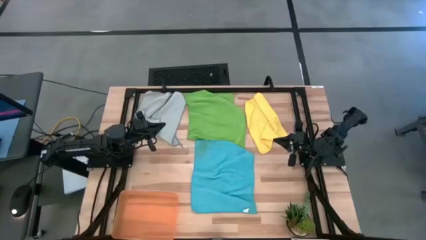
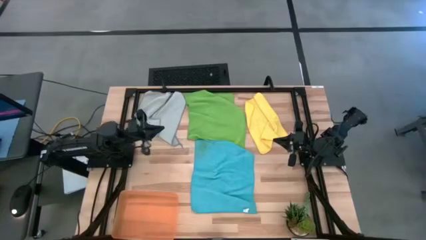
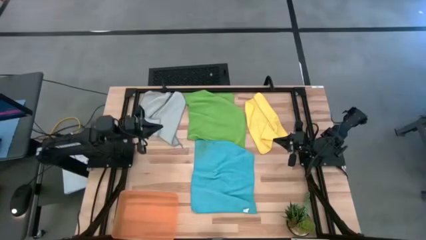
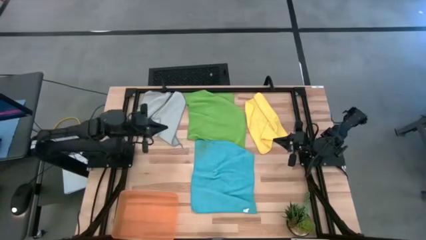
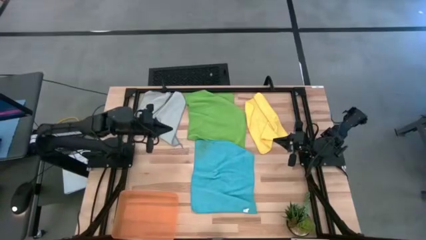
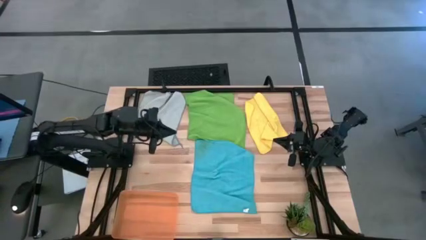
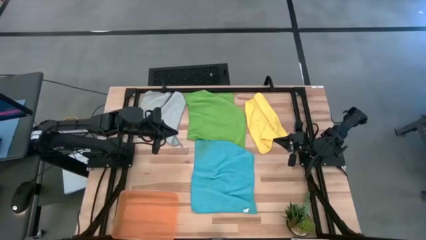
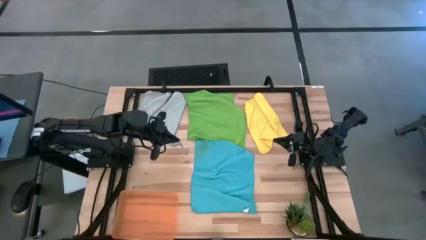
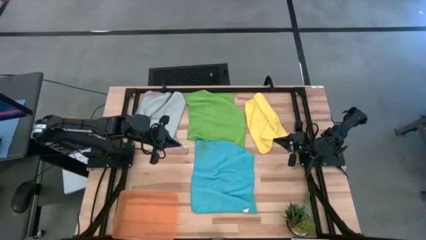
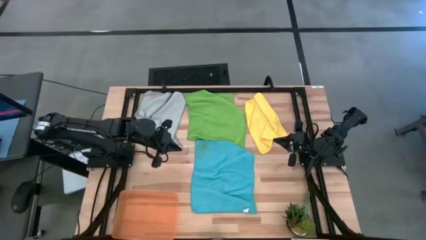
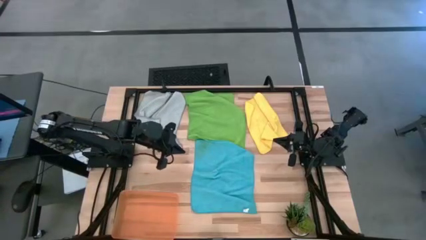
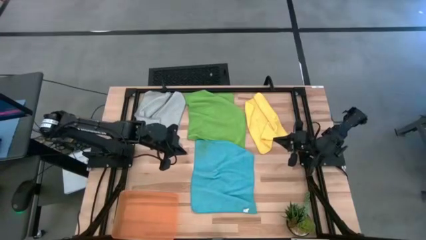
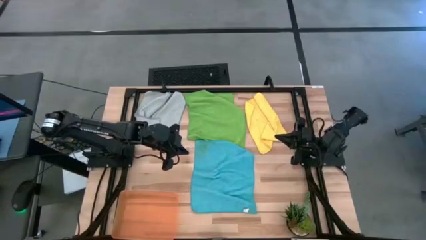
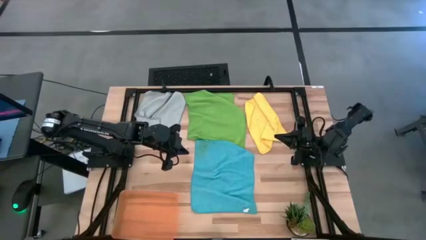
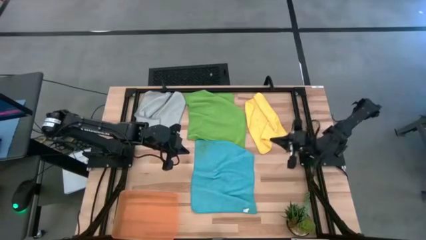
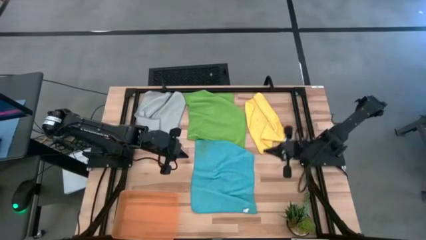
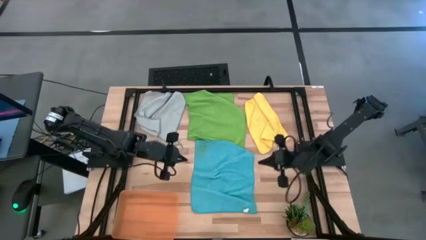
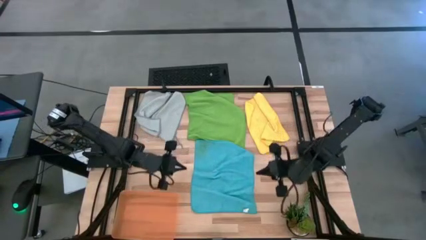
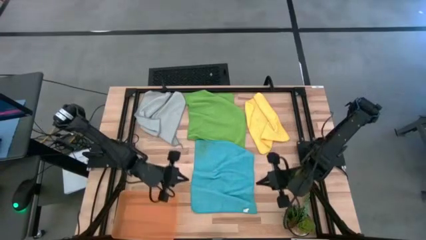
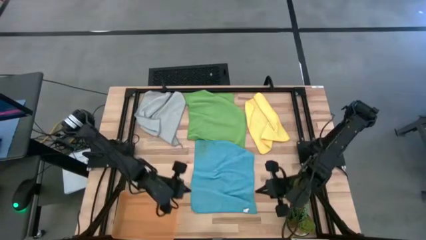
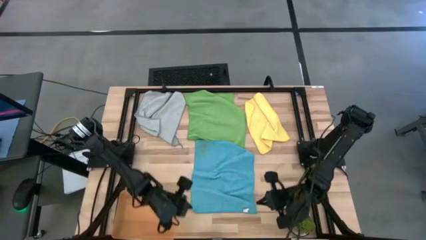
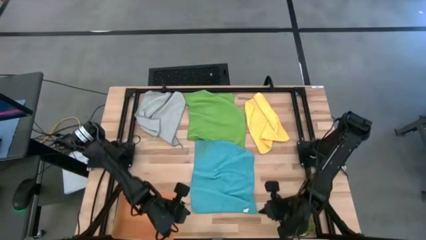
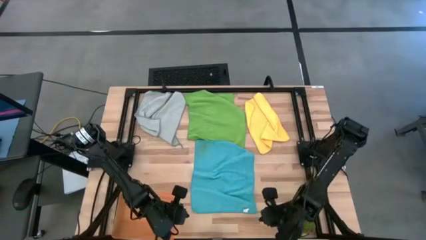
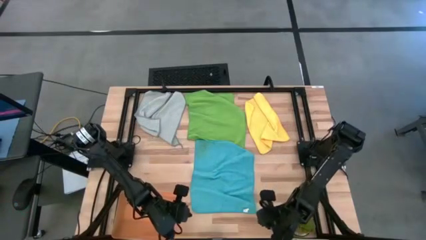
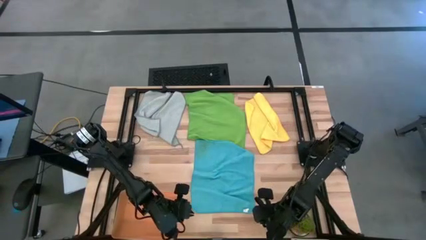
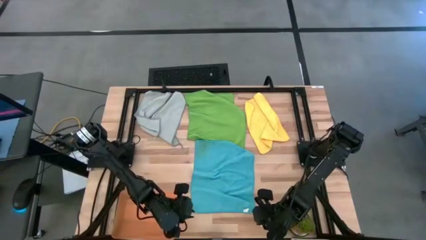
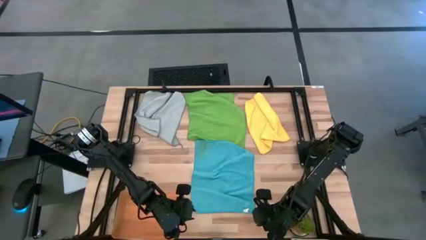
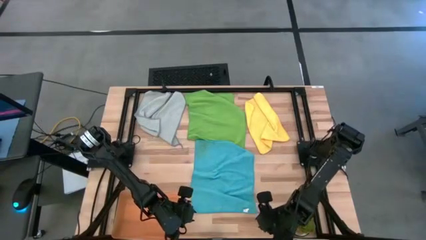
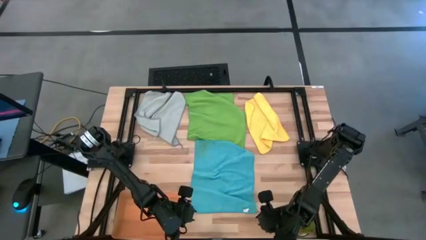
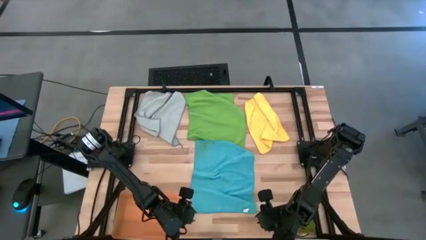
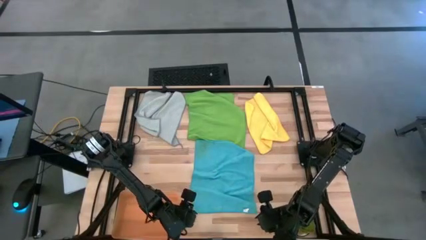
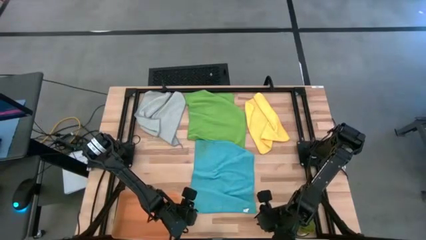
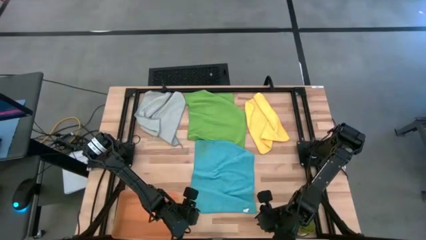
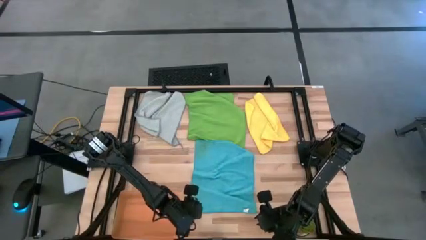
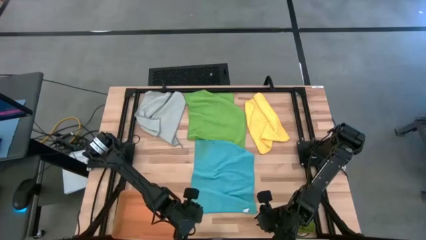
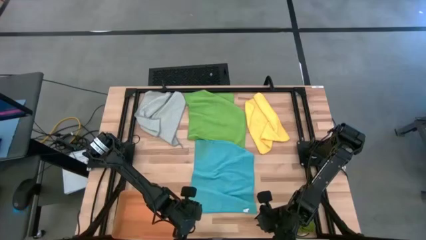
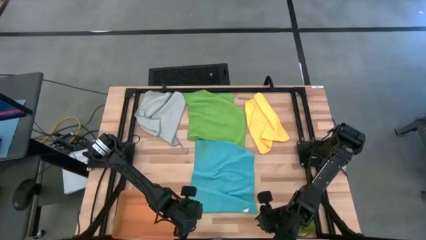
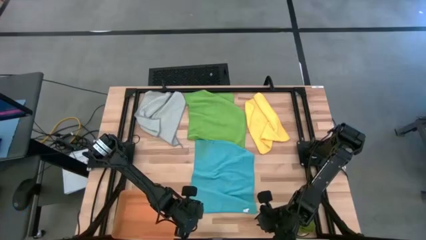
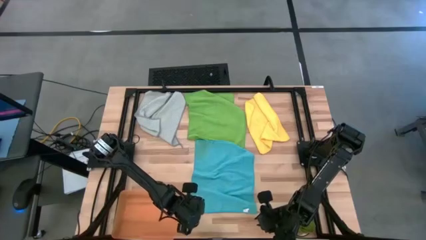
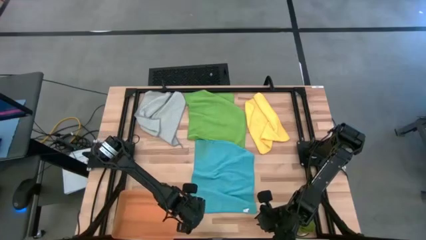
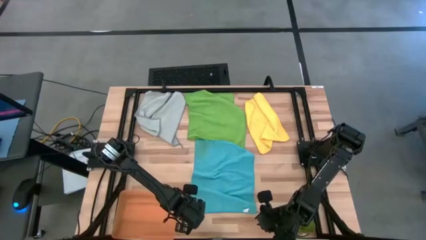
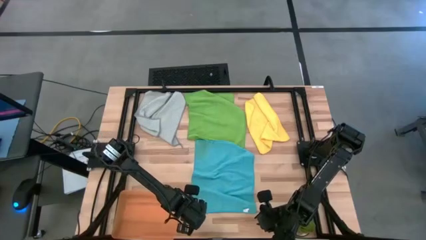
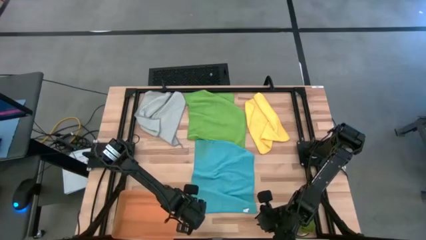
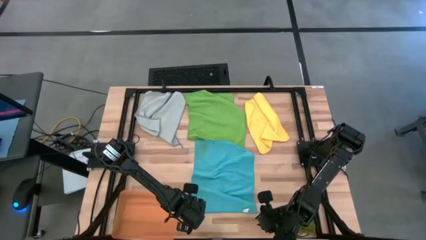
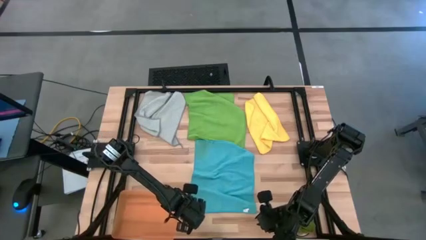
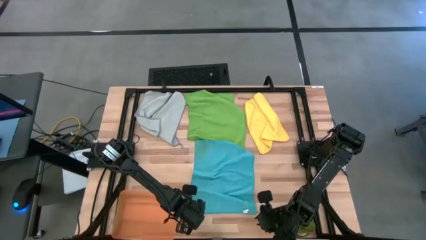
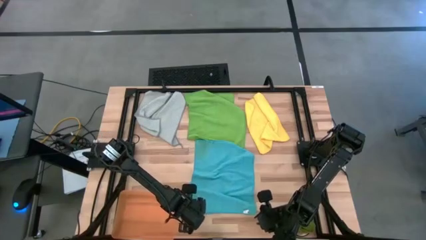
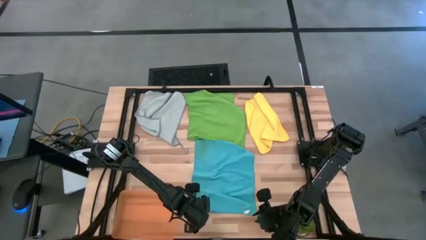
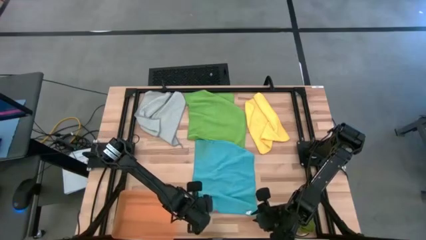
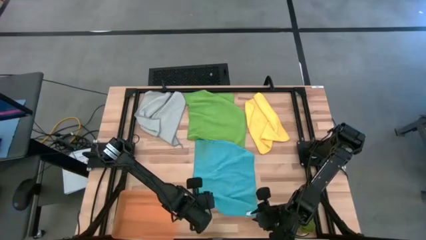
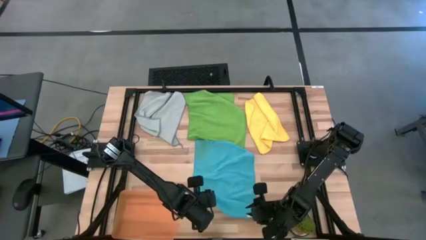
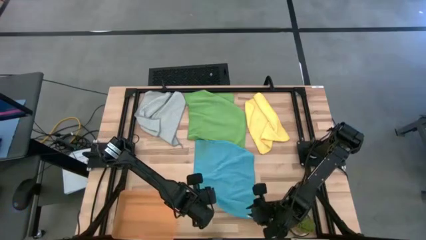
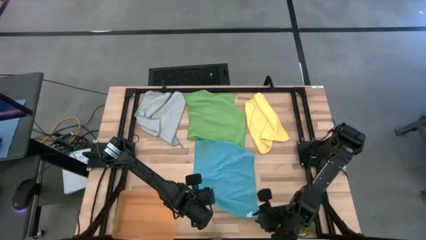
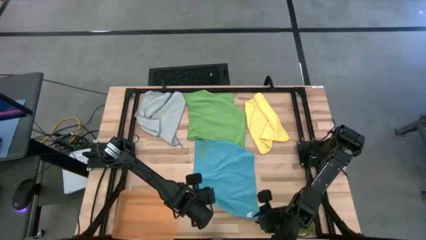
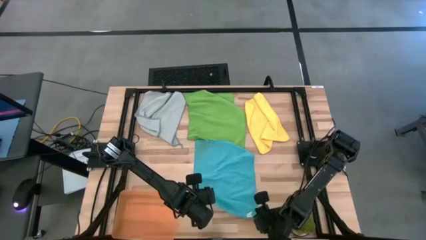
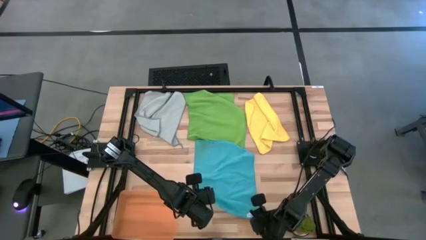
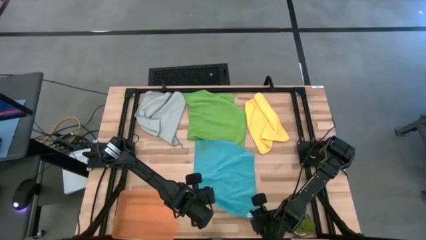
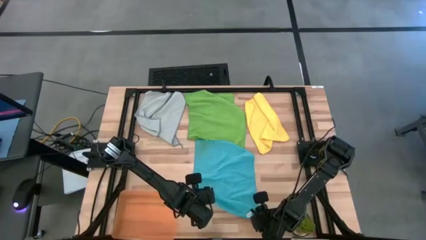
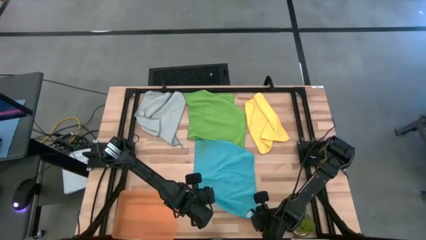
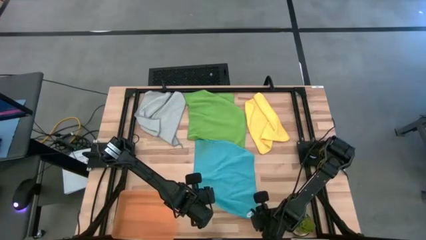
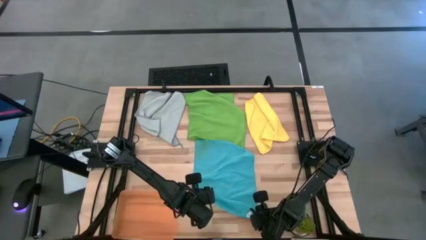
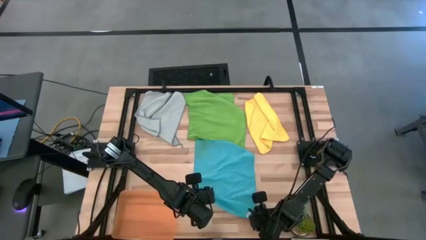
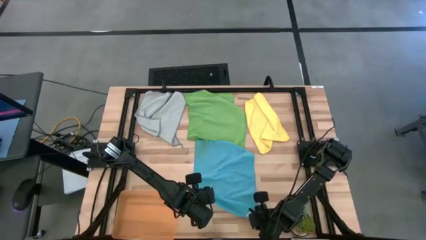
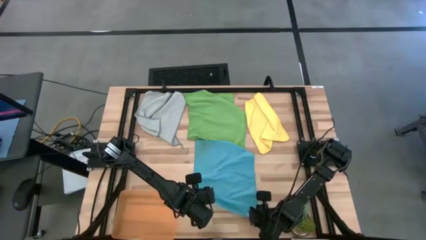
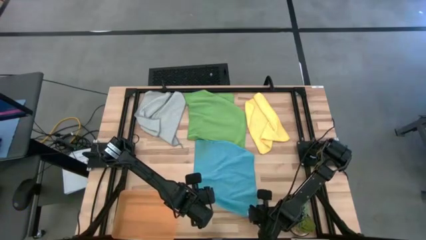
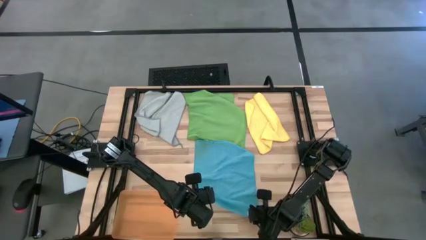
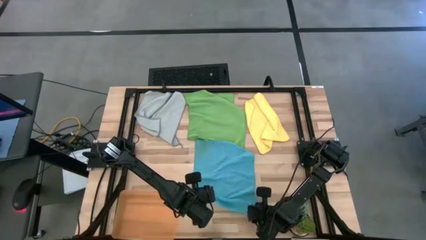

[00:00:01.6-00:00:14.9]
Task: Fold microfiber towels
Fold the blue microfiber towel
